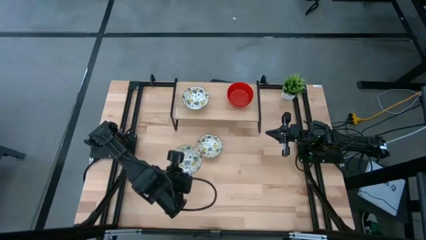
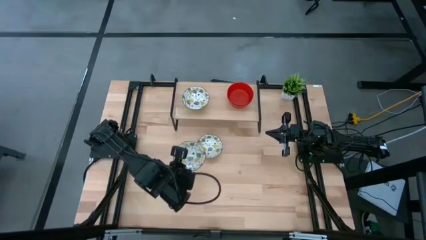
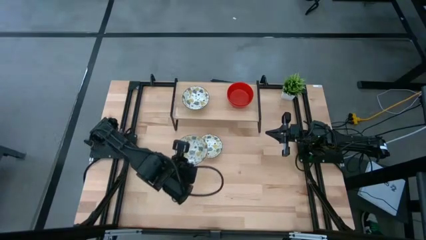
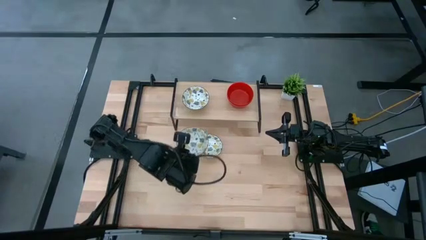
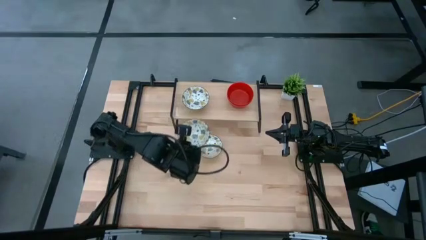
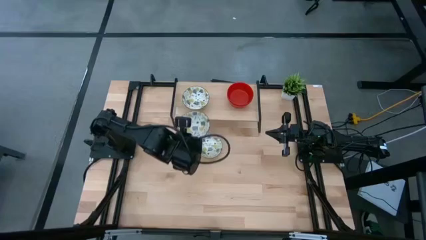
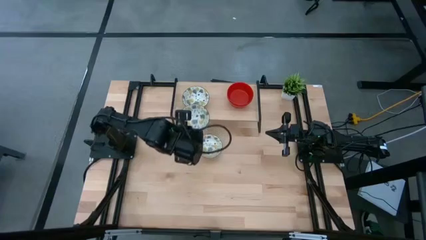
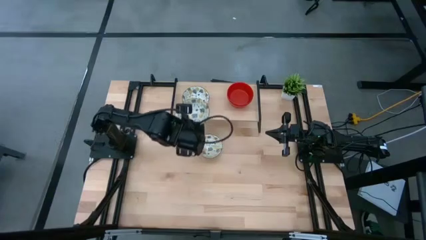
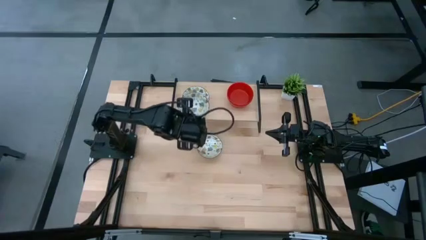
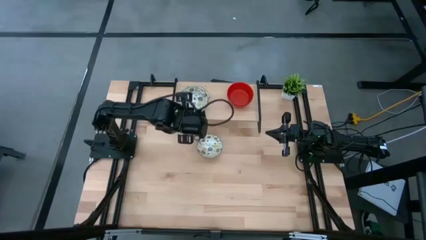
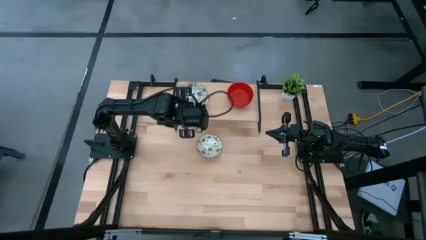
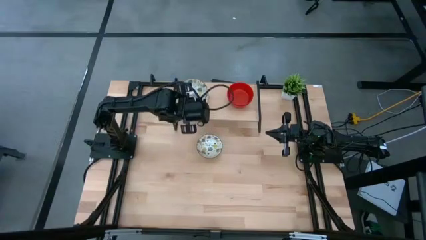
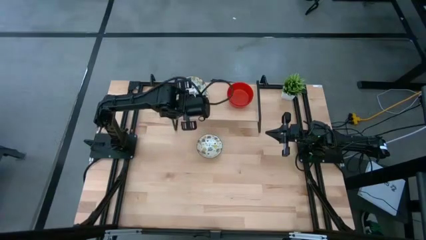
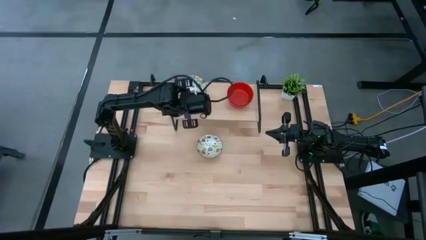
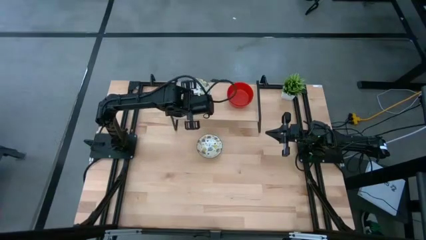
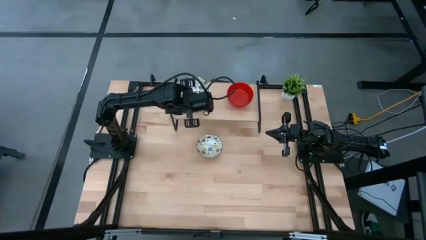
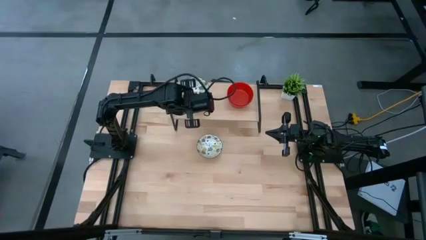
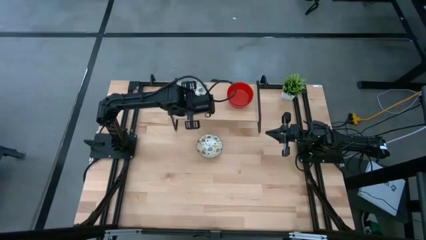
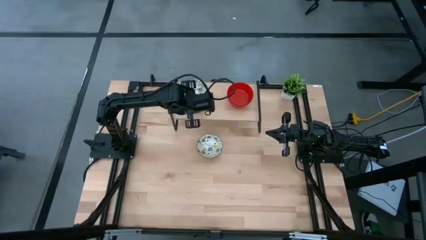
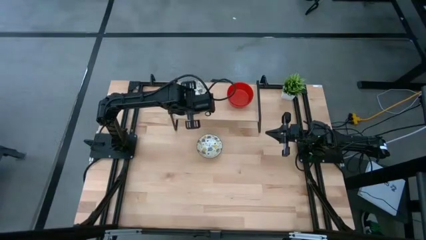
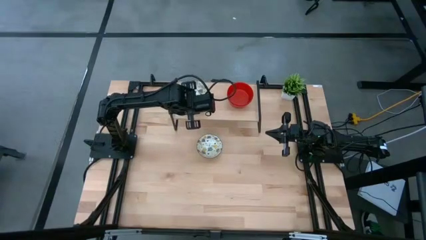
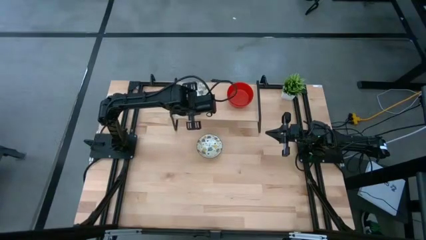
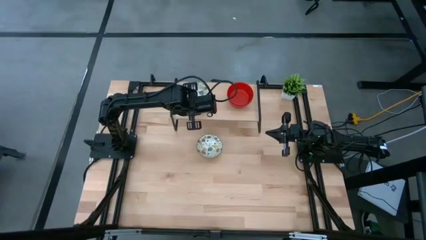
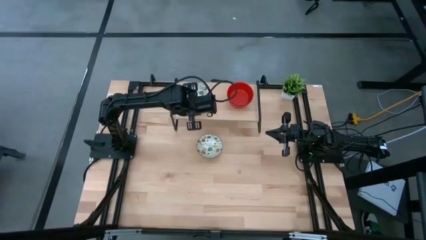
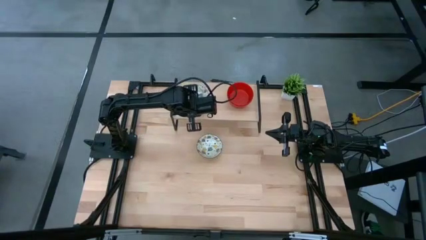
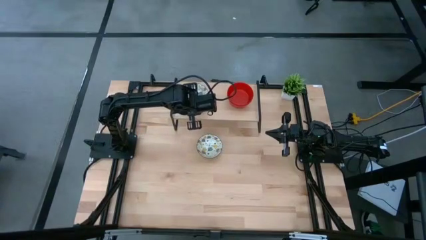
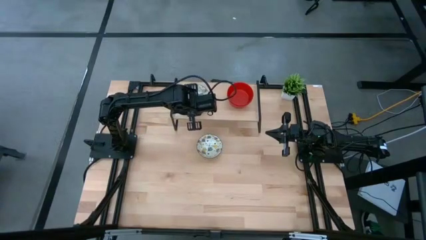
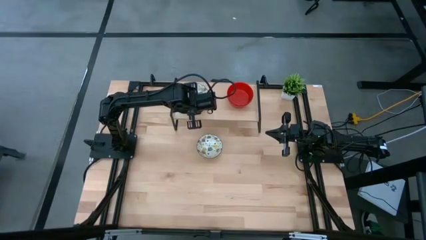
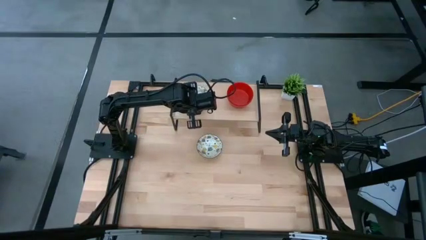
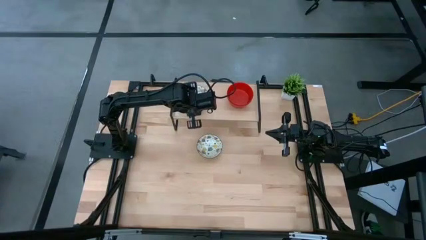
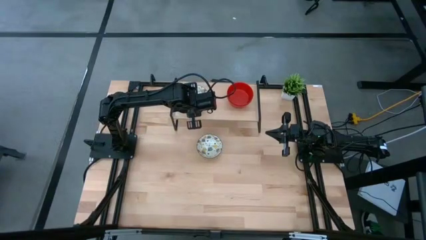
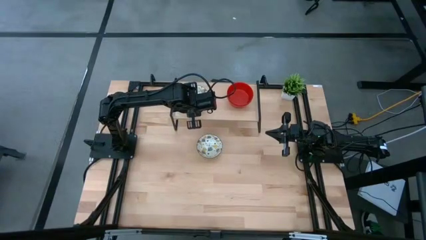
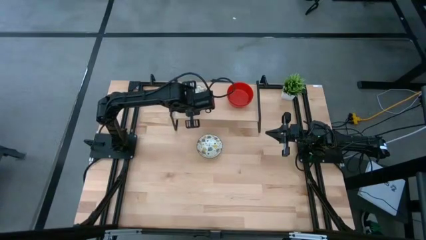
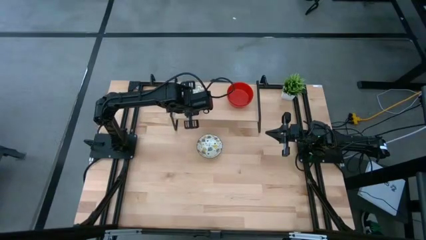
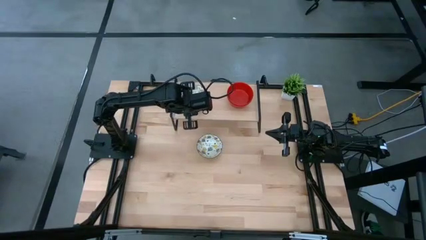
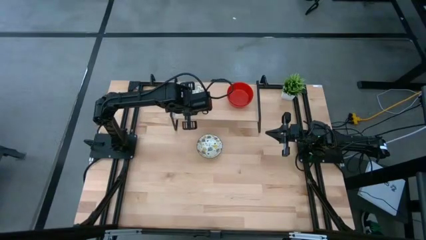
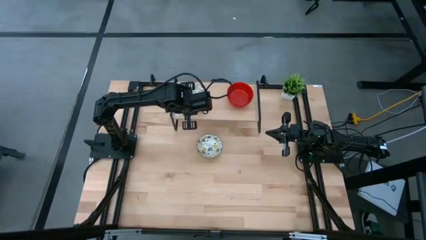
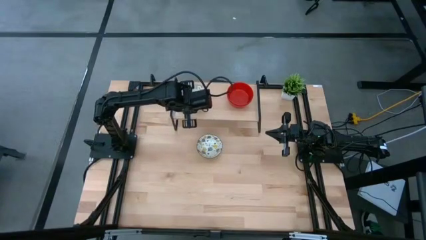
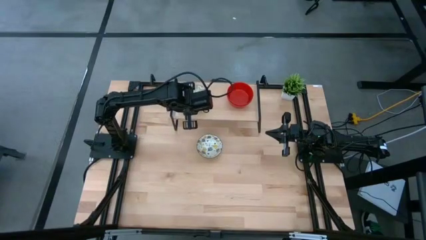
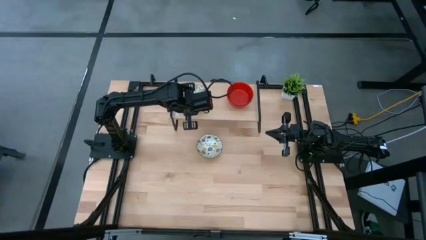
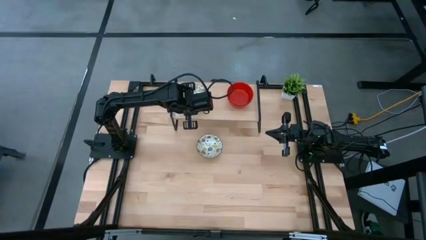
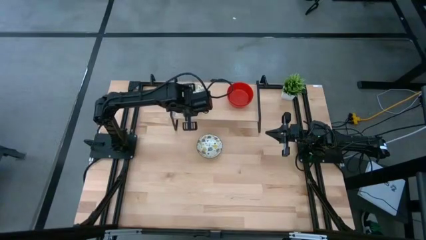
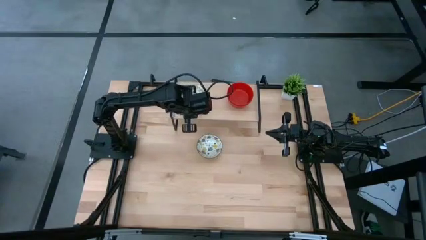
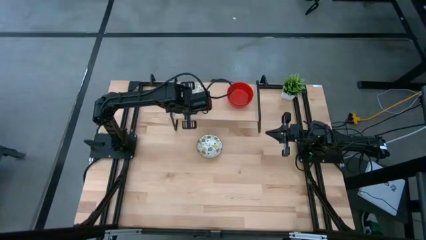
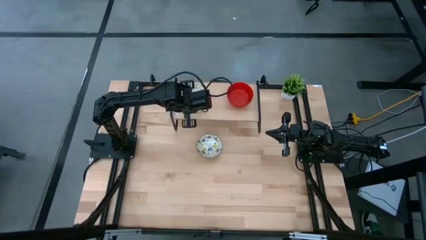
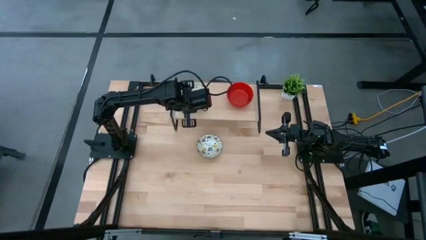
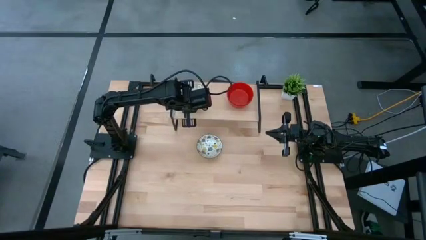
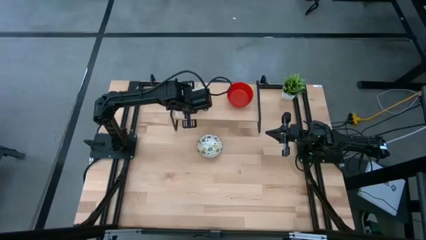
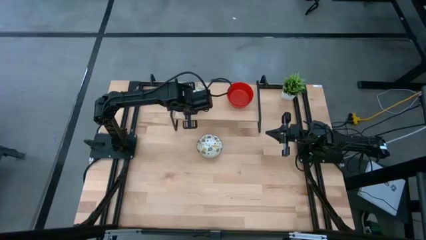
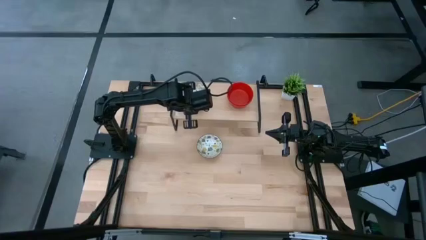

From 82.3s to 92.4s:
Task: Pick & Place Mini bowls
Stack the bottom white patterned bowl on top of the white patterned bowl on the shelf

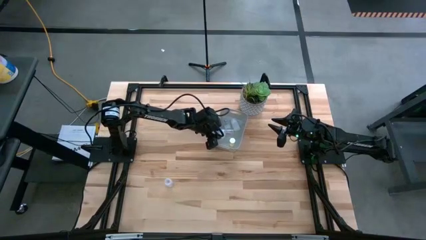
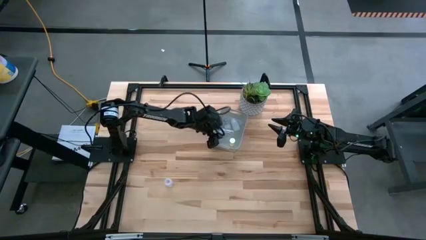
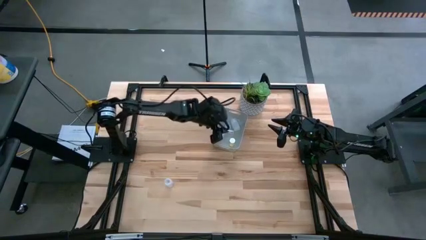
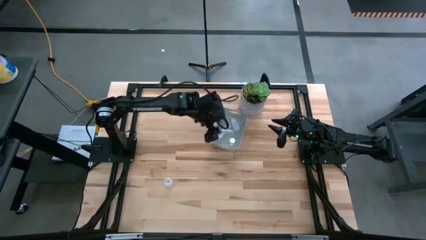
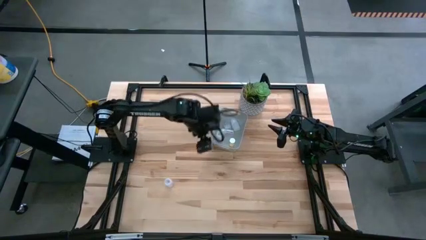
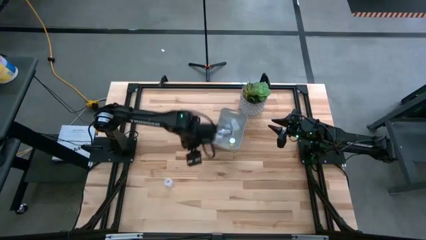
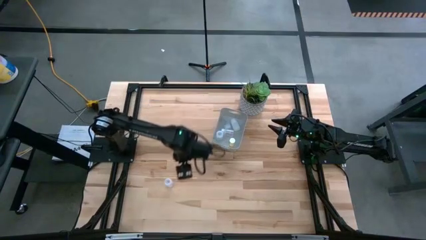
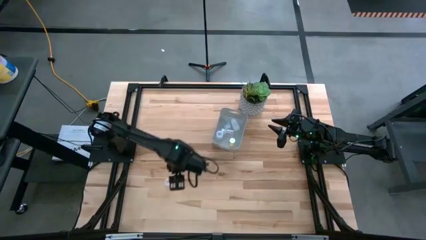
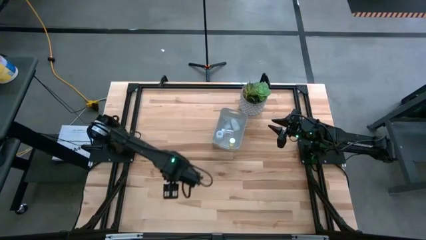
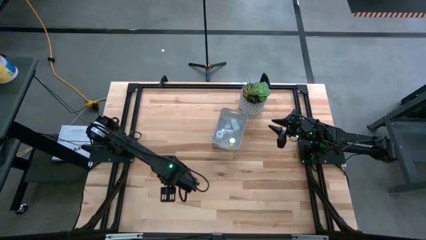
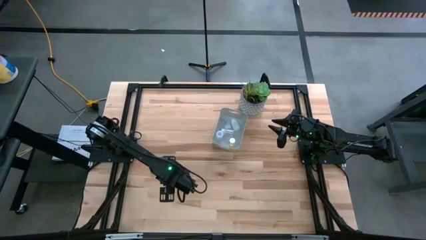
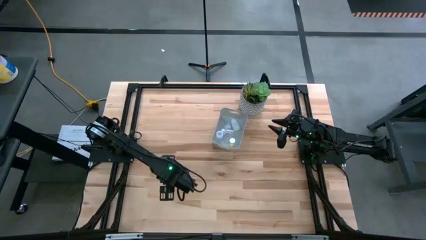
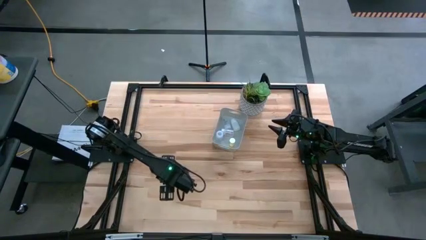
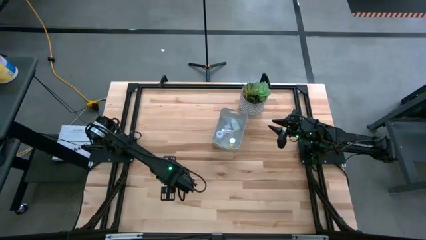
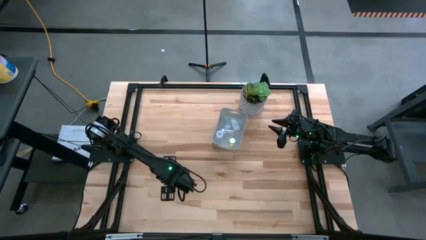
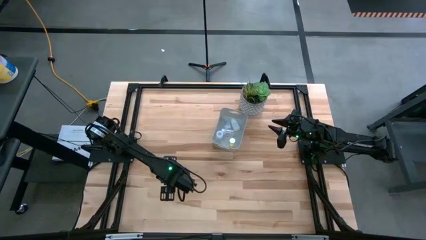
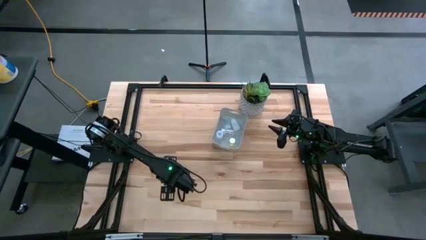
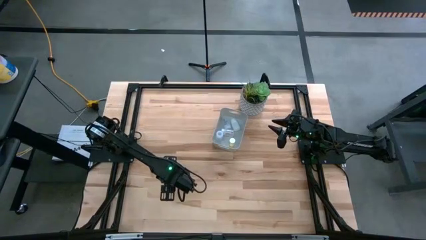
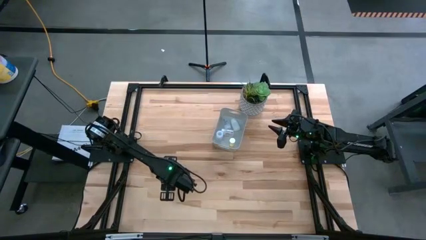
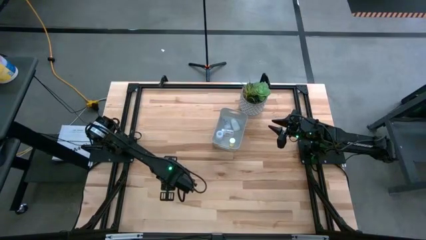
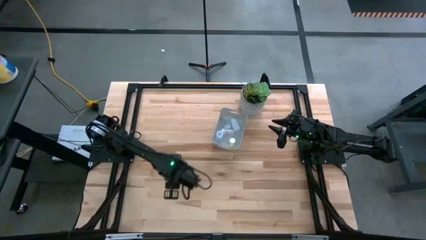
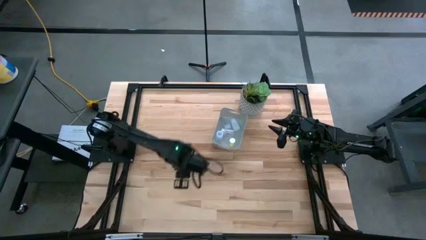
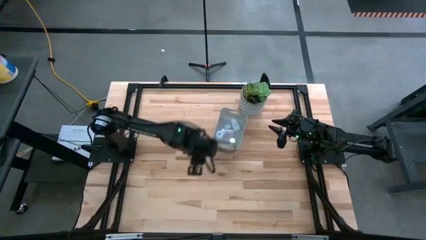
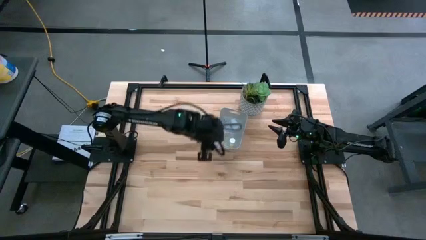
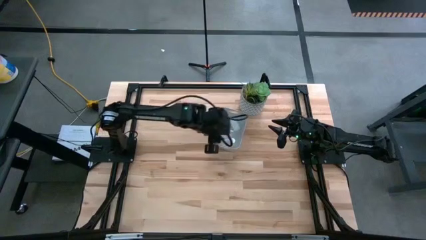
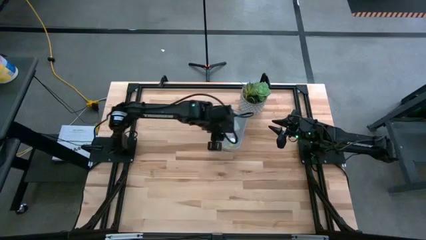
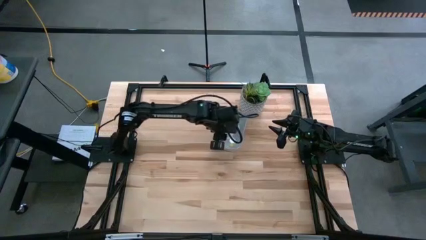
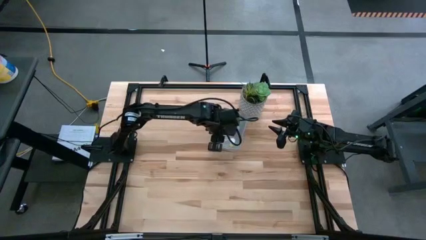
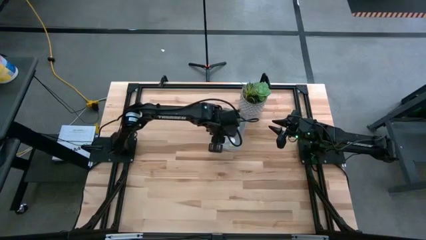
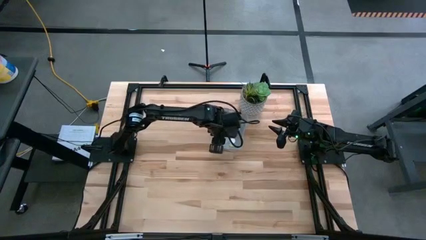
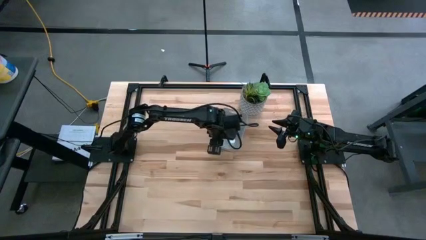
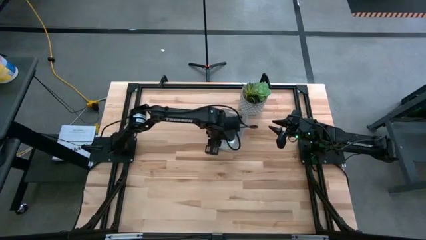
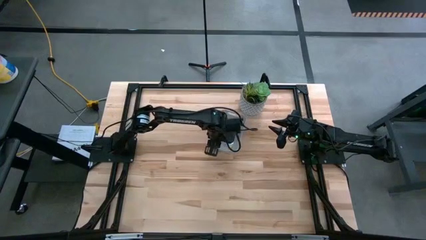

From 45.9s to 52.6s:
Task: Pick and place pill bottles into a basket
Put the transparent pill bottle into the white bin
